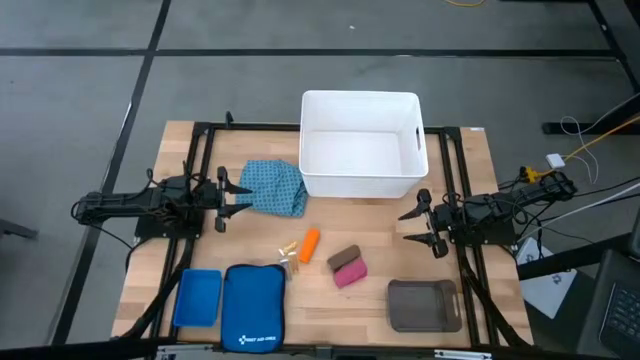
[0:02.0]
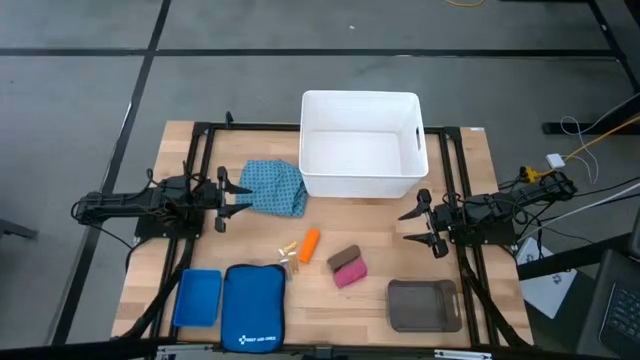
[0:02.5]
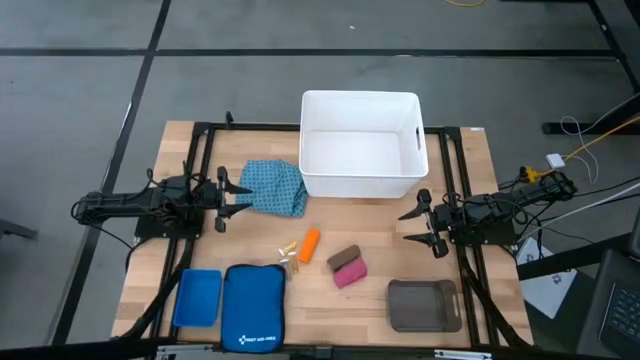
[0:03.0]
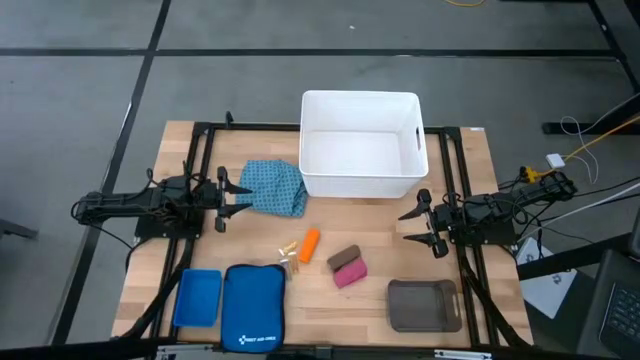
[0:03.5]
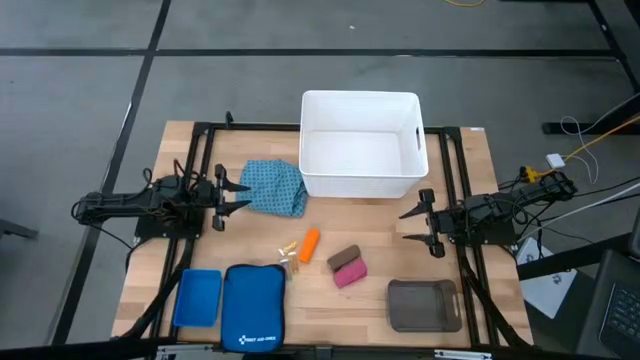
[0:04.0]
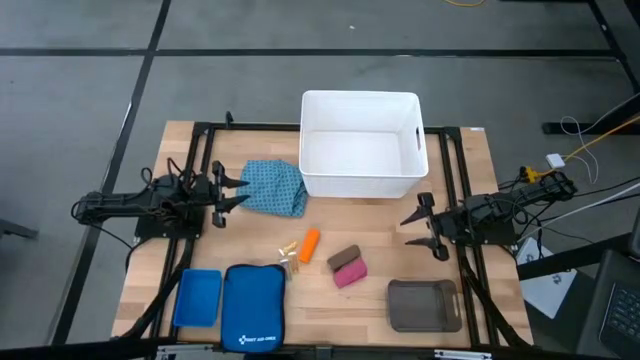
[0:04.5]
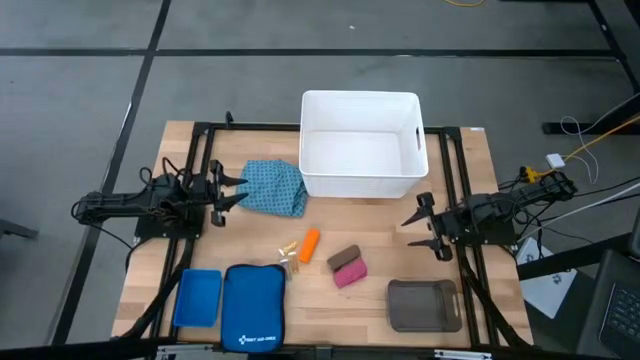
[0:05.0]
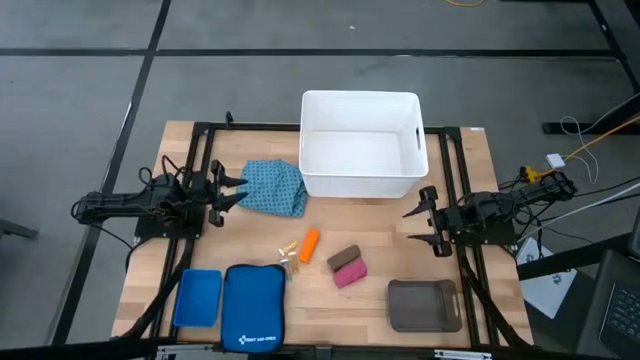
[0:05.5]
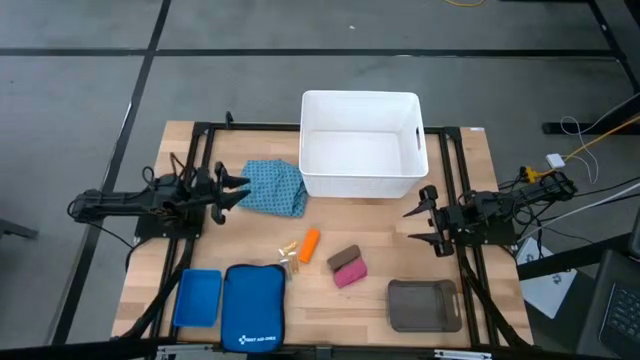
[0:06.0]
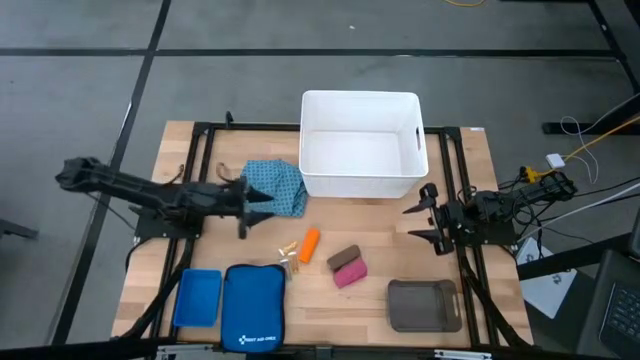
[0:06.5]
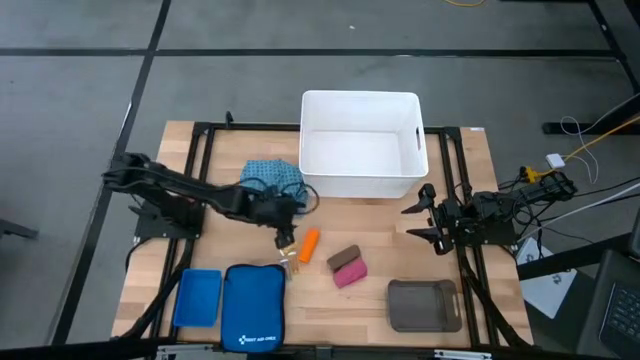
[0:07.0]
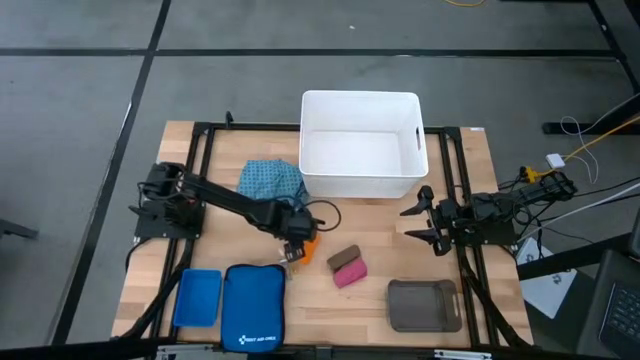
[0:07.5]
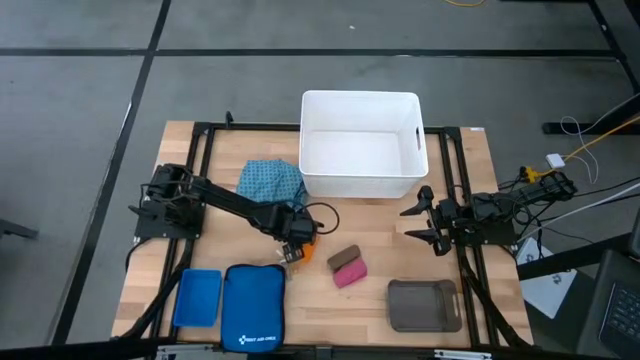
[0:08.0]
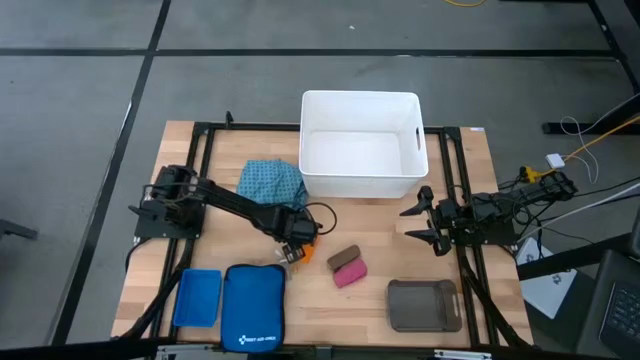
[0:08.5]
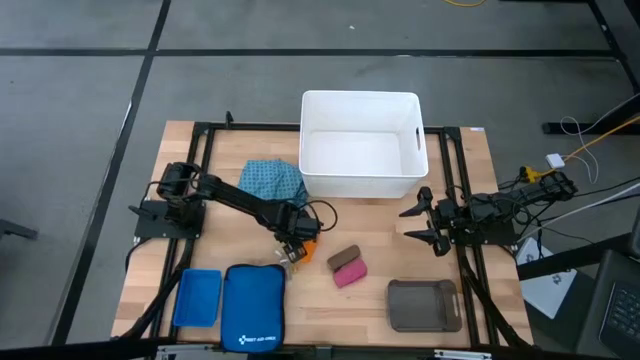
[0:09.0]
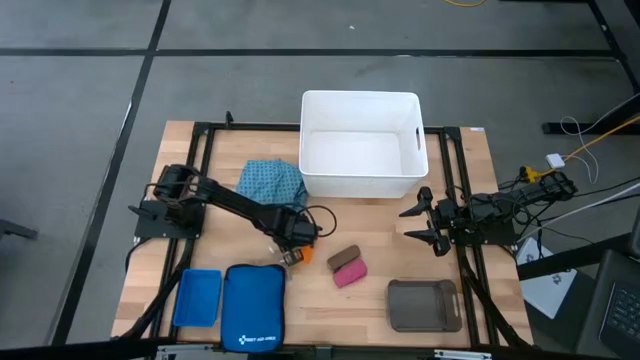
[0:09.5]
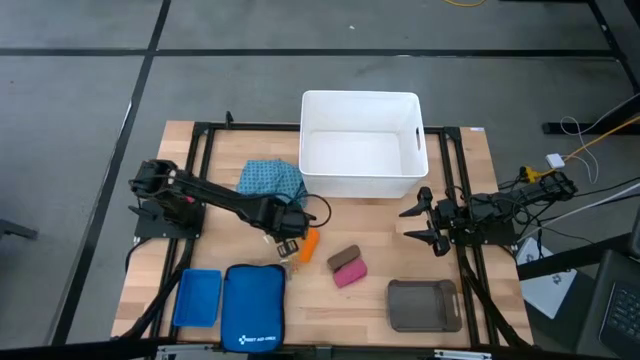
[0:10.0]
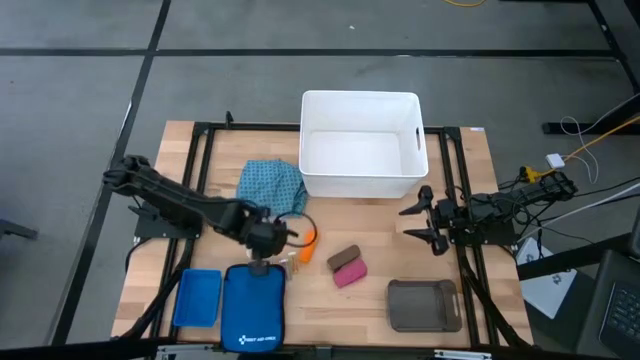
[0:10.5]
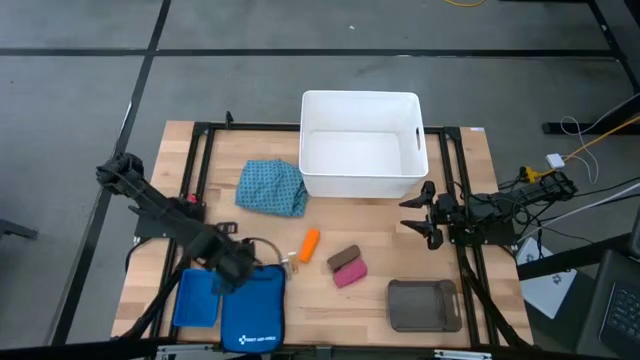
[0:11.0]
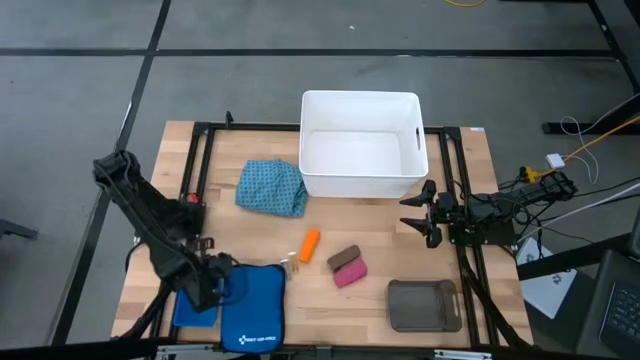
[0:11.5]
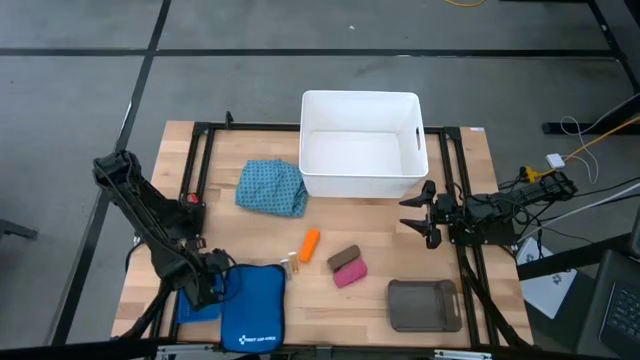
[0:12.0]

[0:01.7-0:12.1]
Task: Pick & place medical supplies in basket/bin
Put the top yellow pill bottle into the blue bin

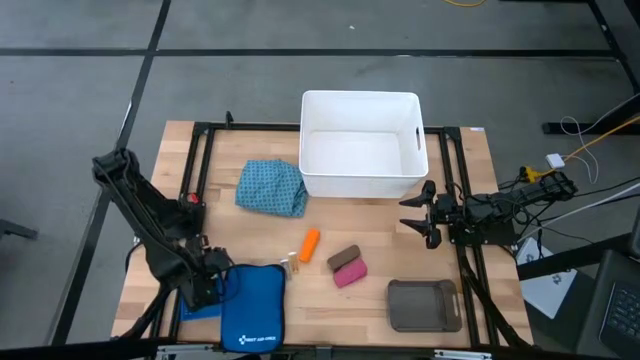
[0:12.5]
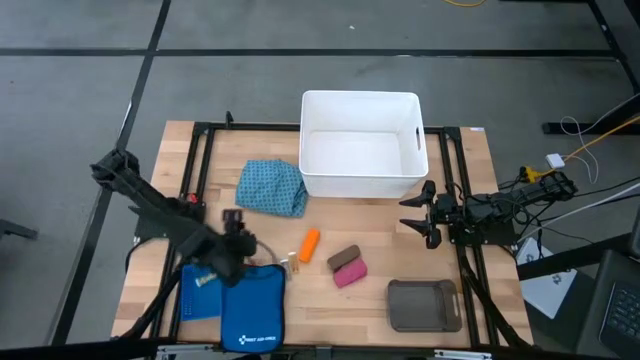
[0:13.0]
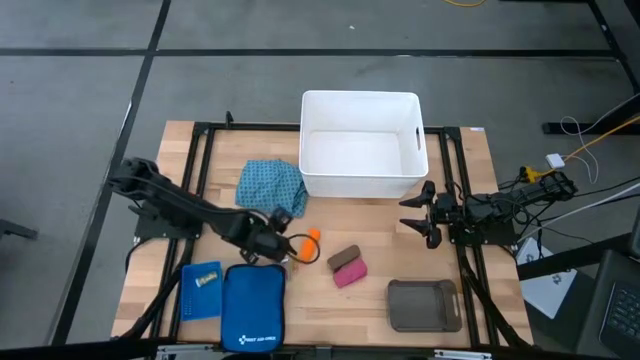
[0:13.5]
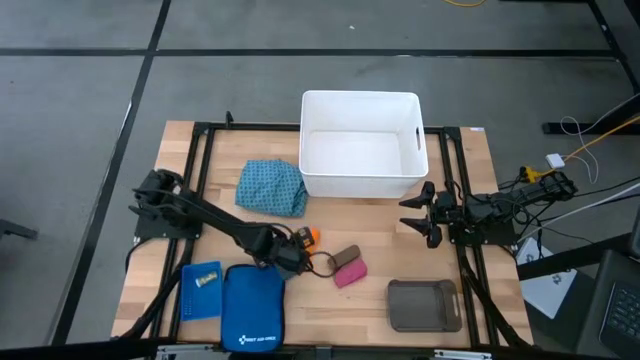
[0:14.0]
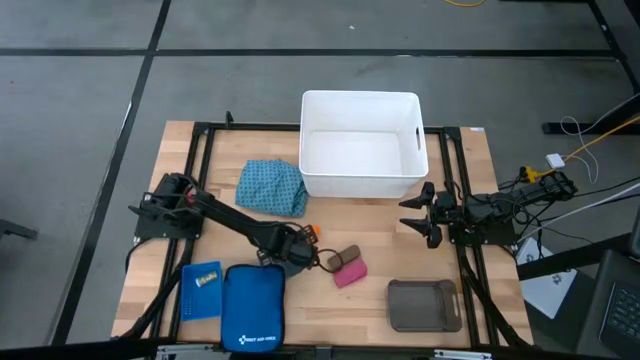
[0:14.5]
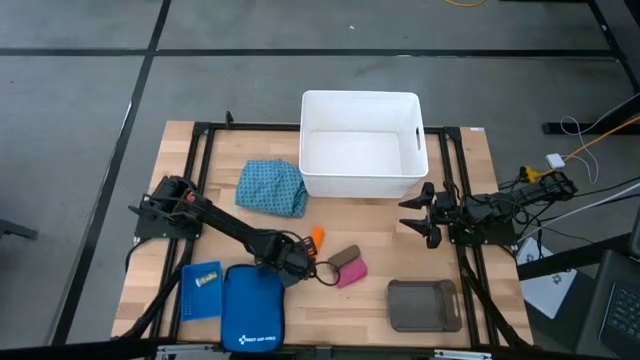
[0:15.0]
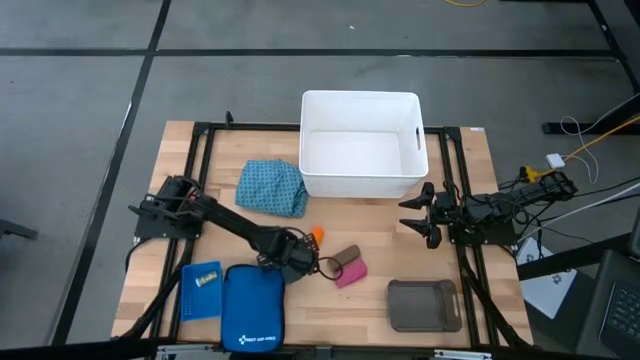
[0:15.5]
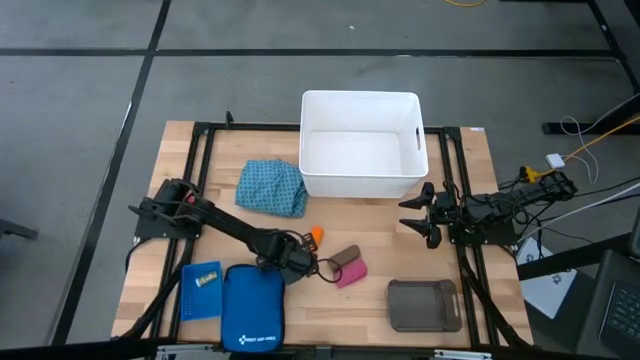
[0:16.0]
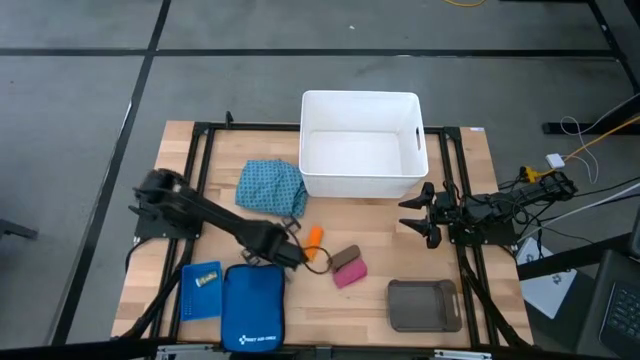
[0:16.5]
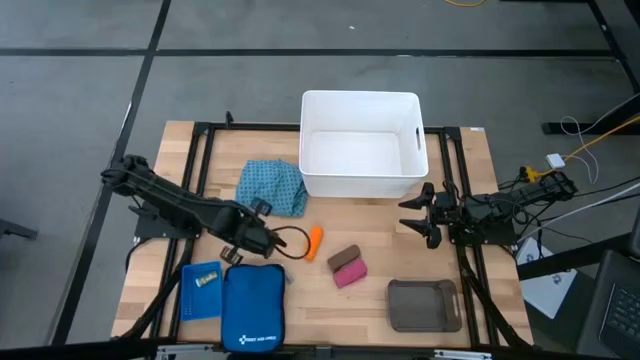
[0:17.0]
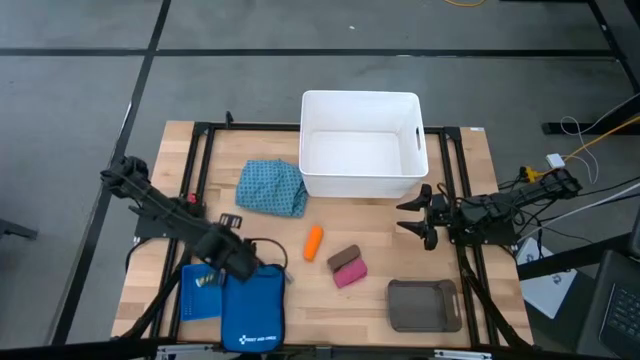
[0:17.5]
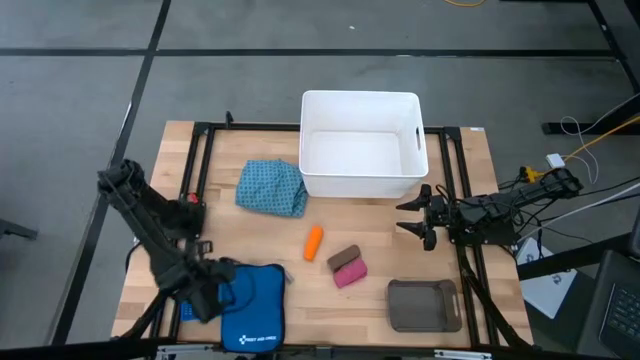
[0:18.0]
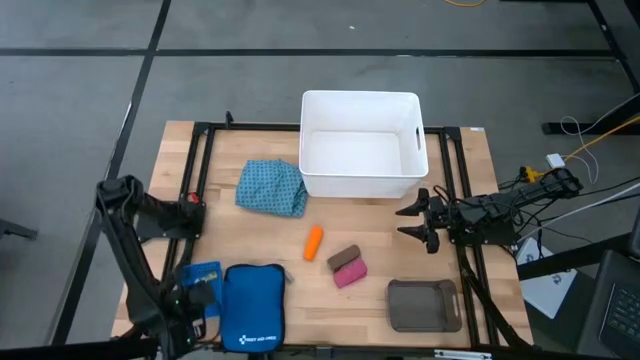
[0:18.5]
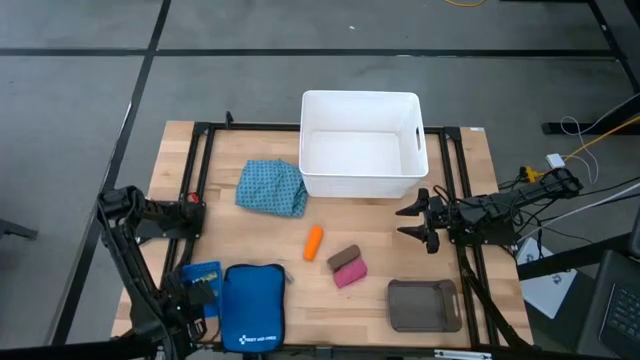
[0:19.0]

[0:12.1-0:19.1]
Put the yellow pill bottle into the blue bin

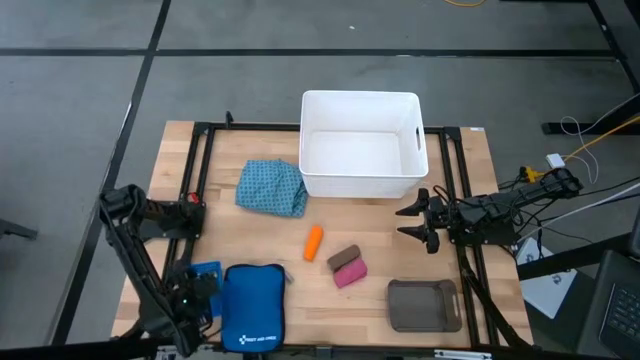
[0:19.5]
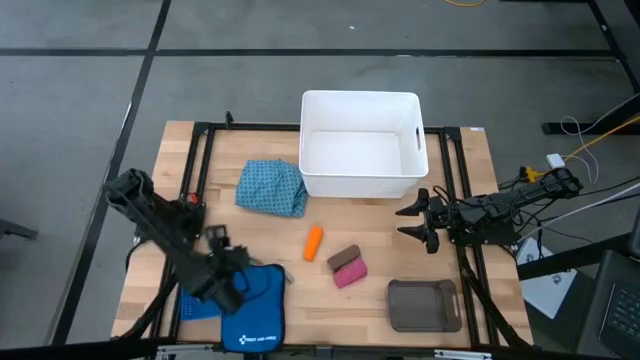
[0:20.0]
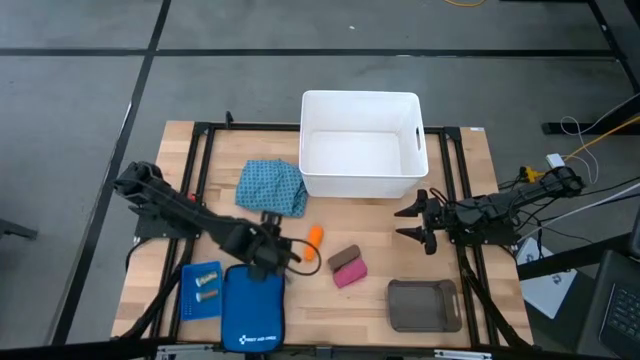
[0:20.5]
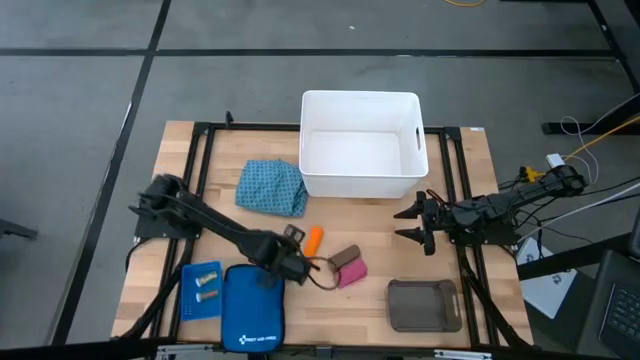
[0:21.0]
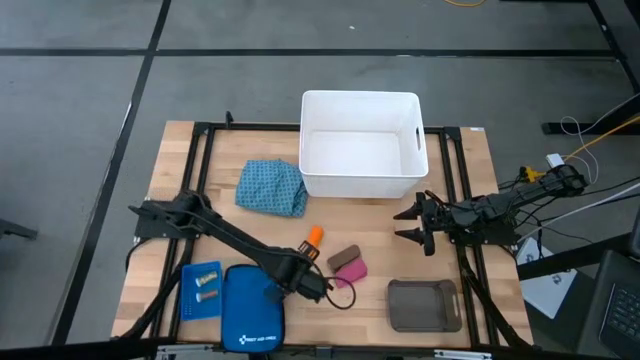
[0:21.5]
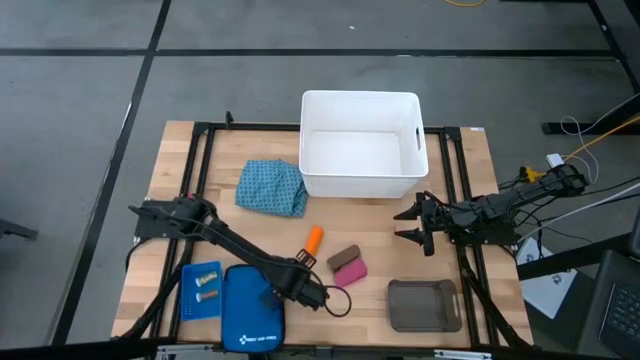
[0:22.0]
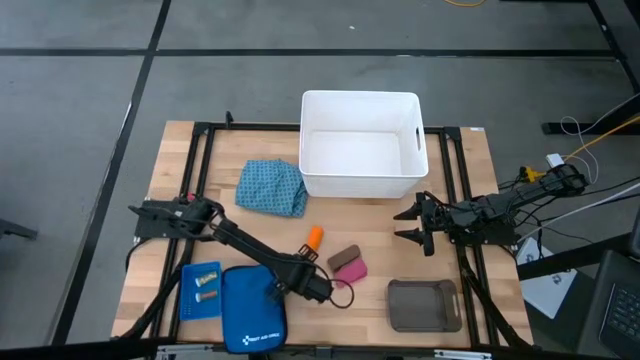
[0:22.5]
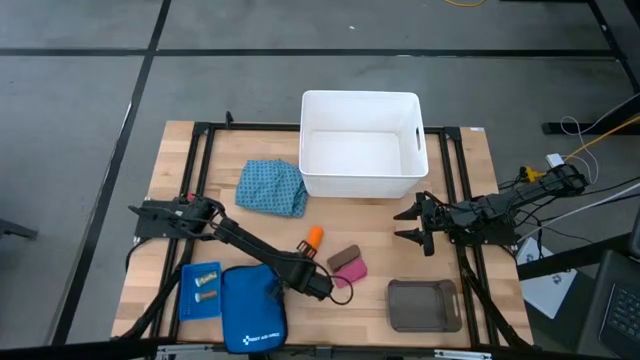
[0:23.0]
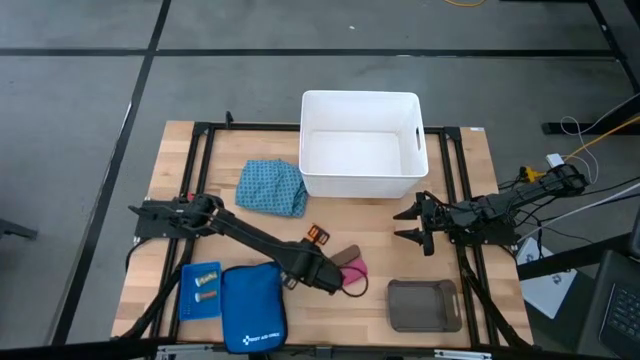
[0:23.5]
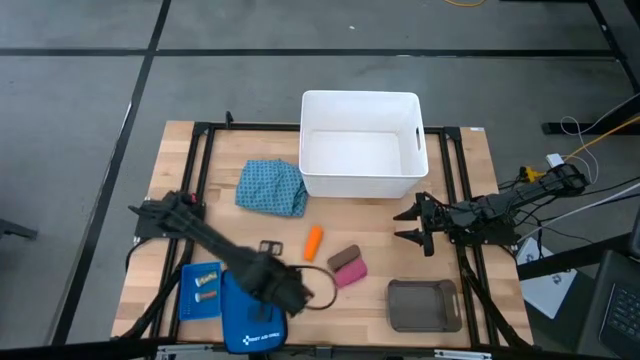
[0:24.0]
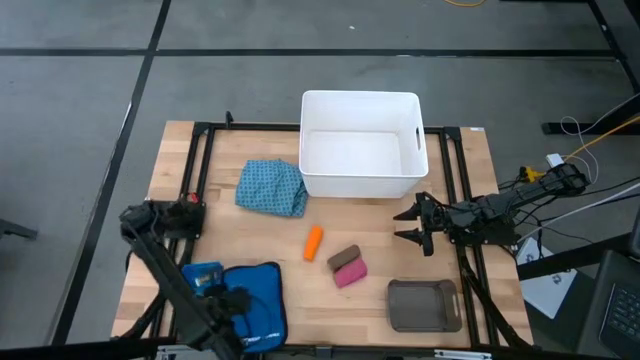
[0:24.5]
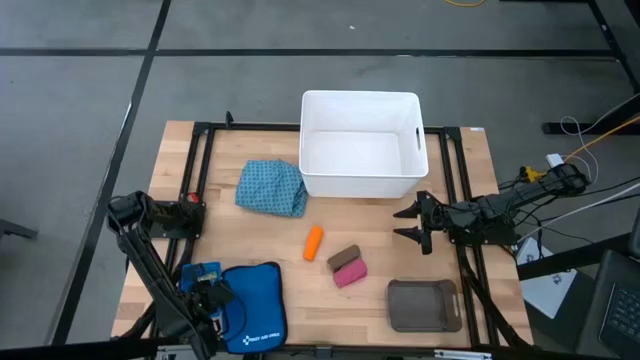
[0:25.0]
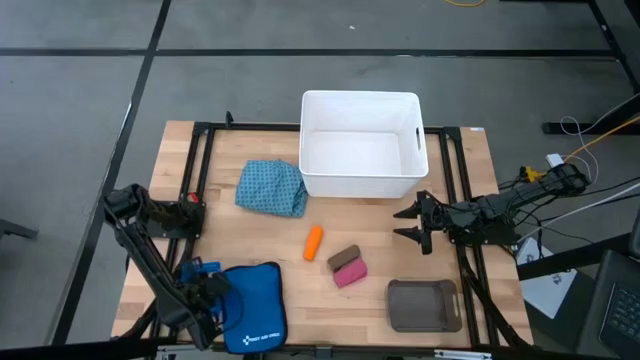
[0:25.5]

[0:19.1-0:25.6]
Put the green pill bottle into the blue bin
